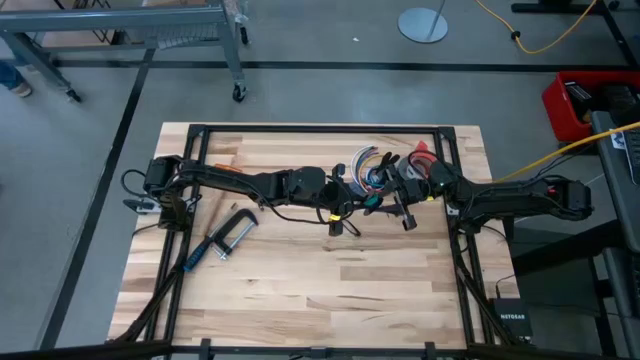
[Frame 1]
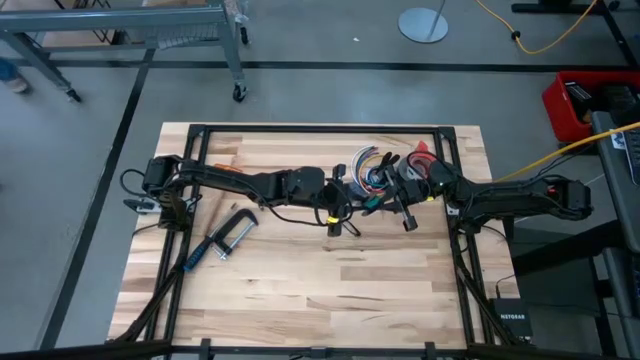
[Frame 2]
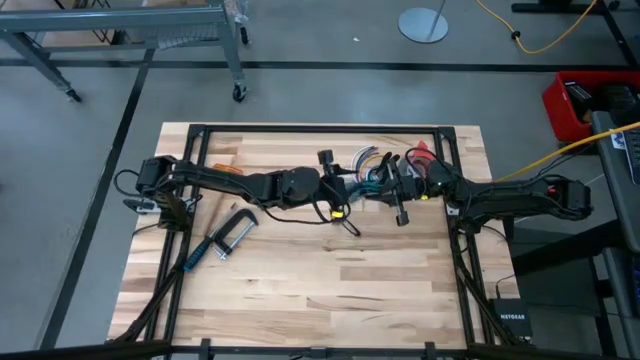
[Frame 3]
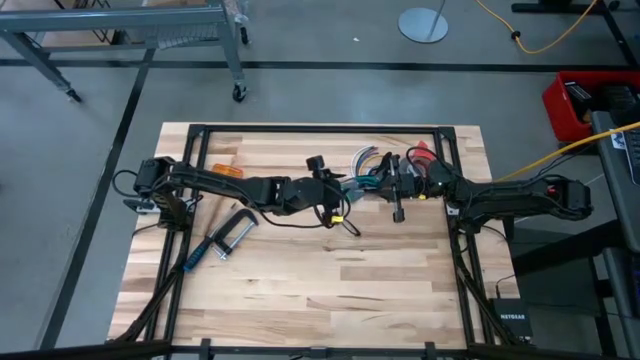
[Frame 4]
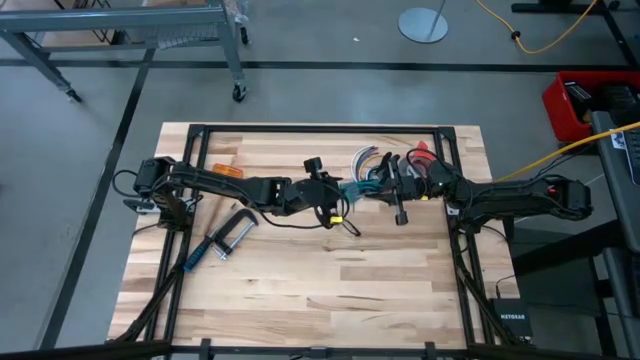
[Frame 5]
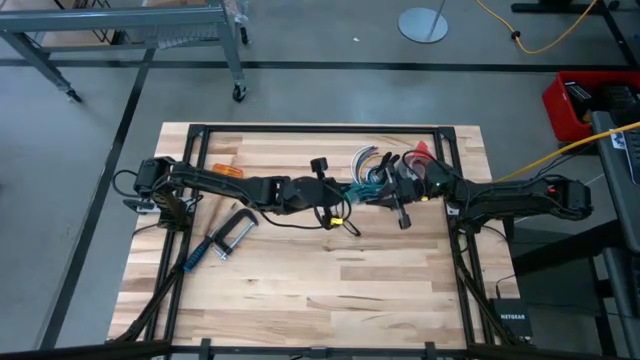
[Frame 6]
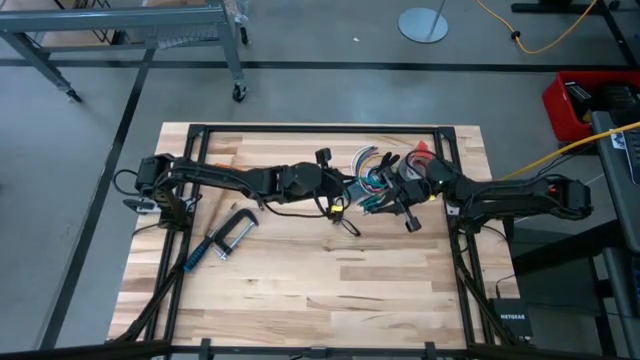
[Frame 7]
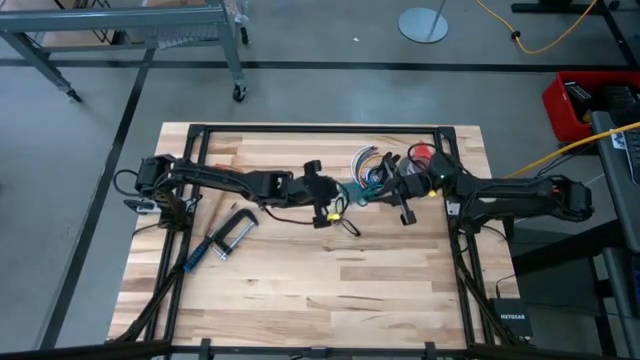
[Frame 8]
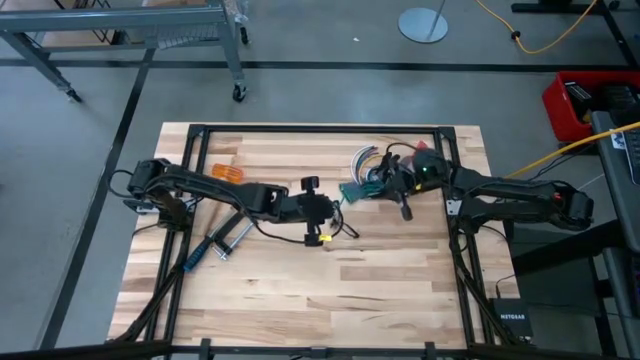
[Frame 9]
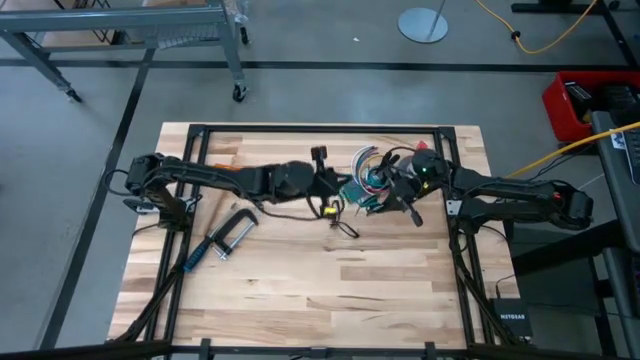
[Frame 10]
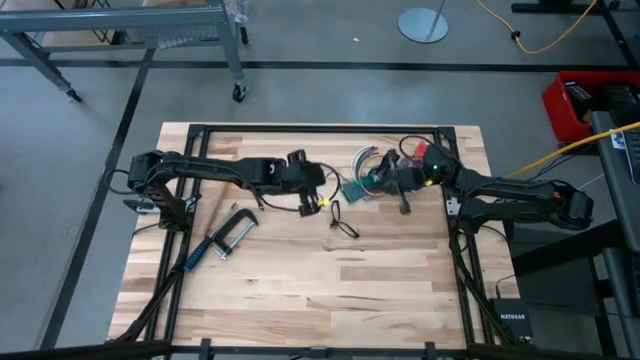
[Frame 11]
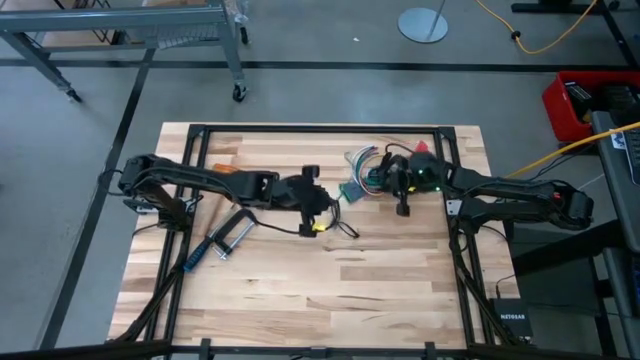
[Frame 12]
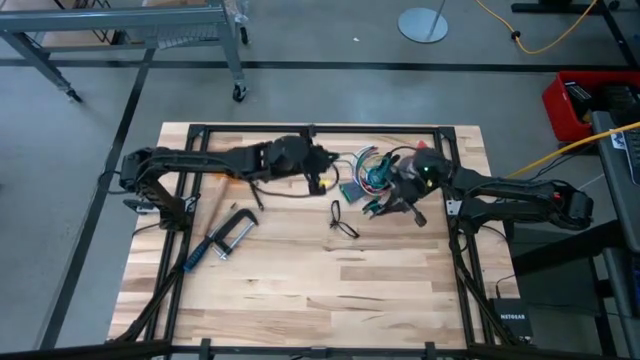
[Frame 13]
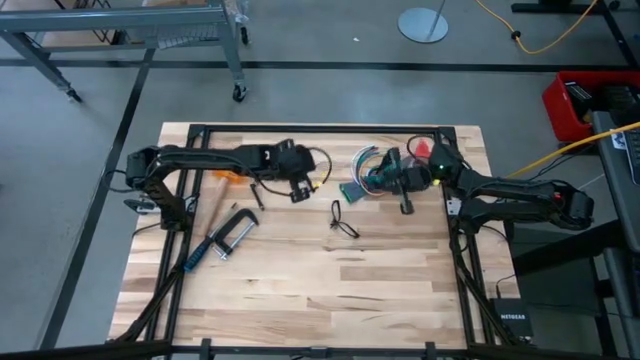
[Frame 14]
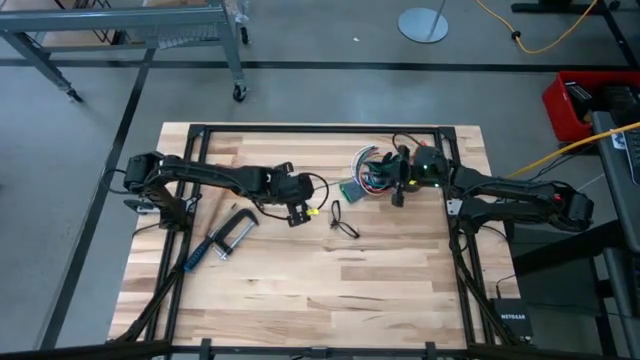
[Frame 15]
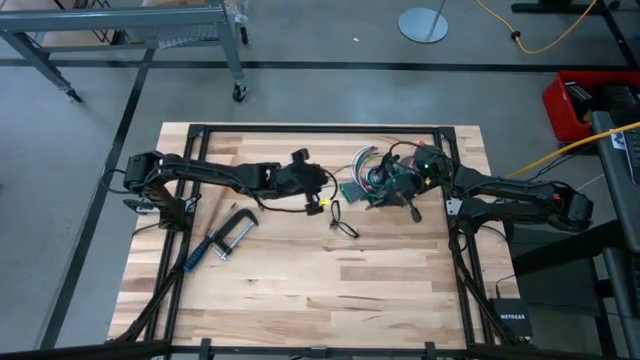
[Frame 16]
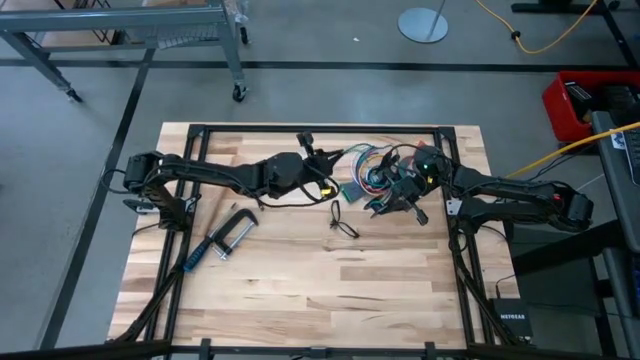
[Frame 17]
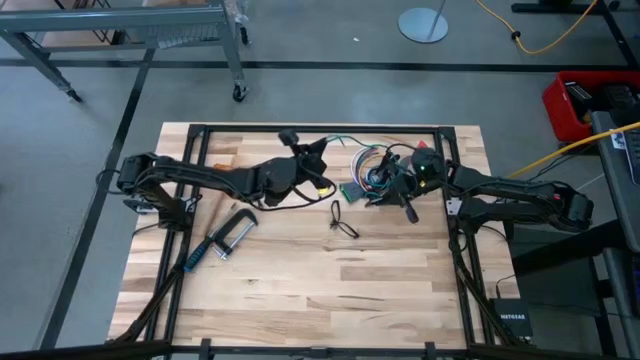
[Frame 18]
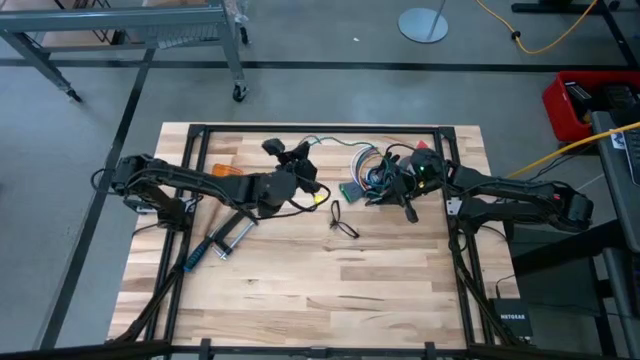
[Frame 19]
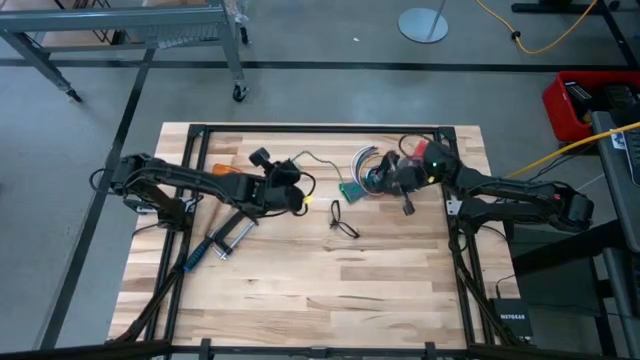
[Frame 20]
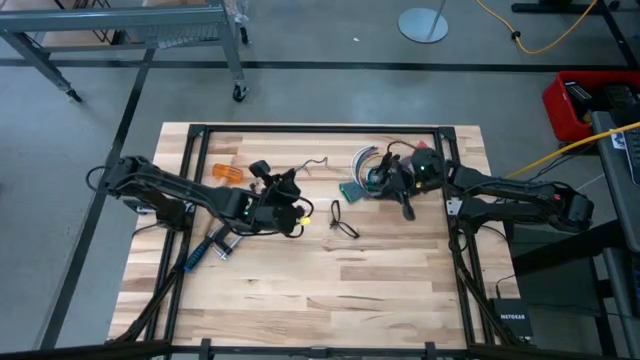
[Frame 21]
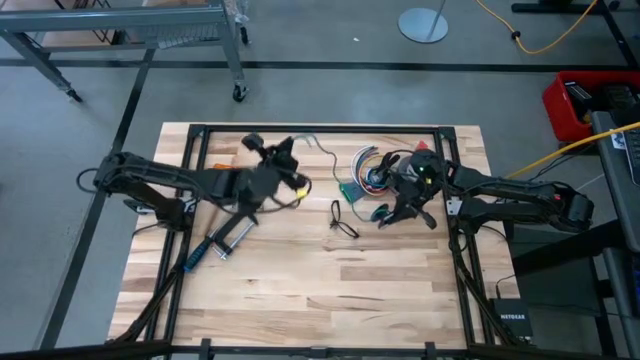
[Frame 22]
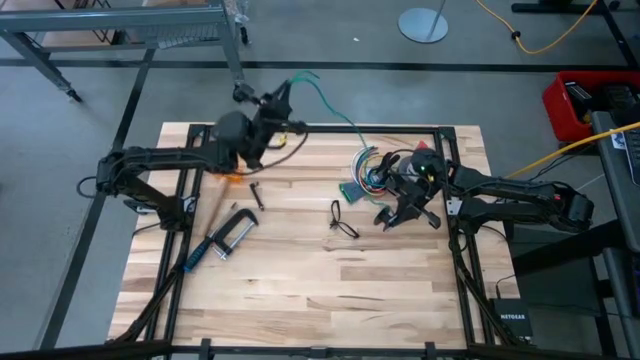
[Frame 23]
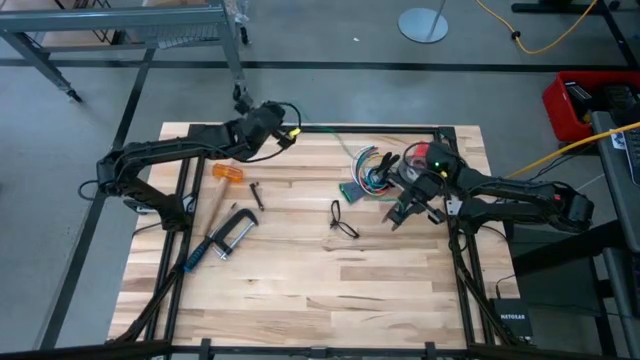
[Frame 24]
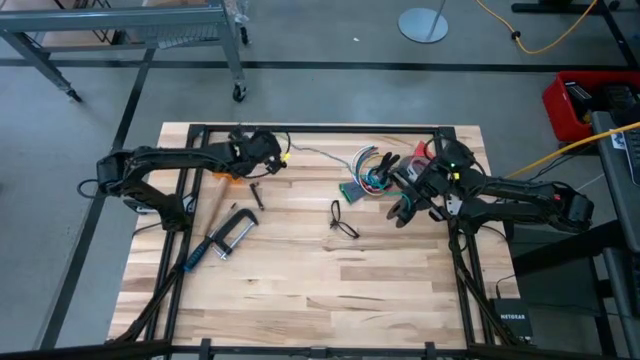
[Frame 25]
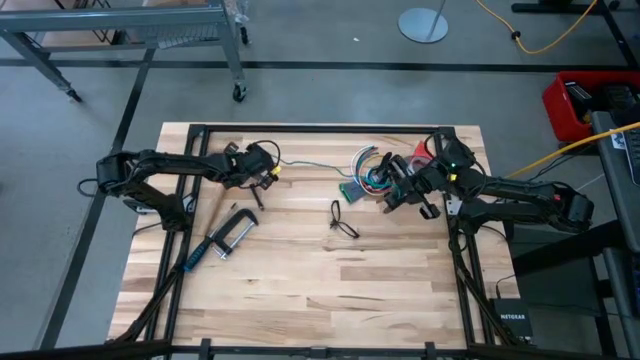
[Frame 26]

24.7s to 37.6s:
Task: Coil cords
Uncoil the green wire from the black spool

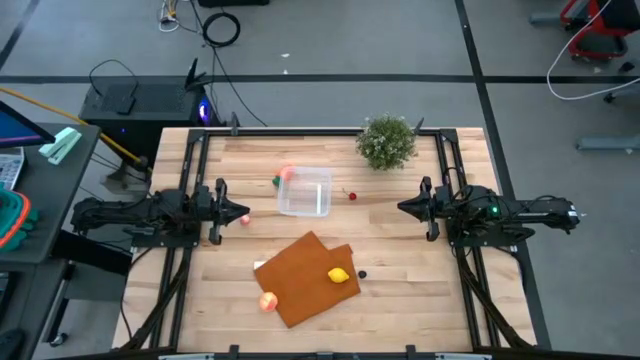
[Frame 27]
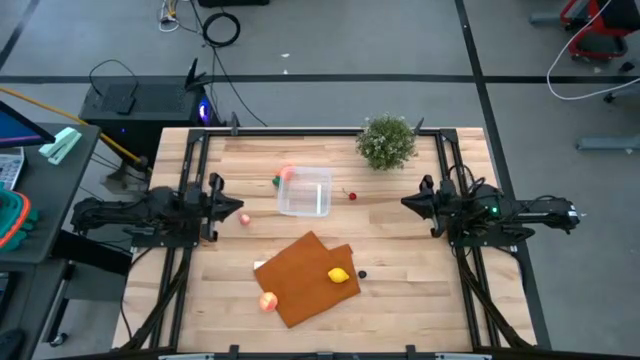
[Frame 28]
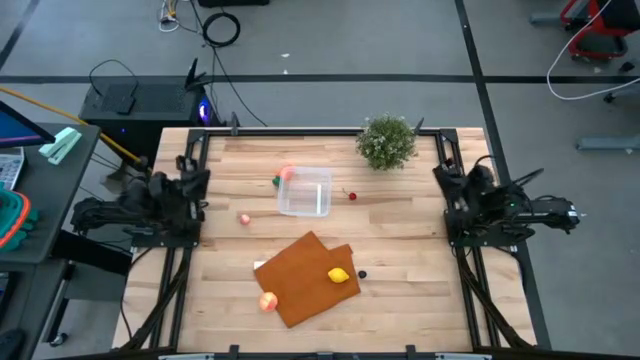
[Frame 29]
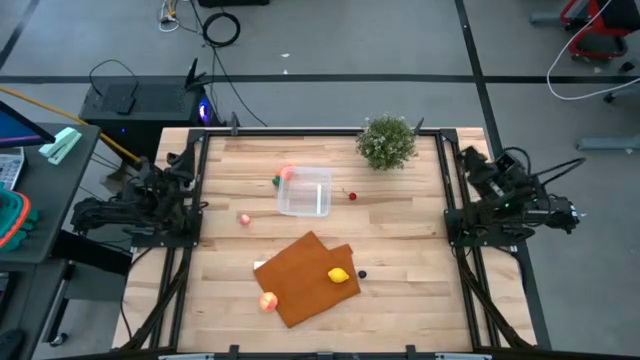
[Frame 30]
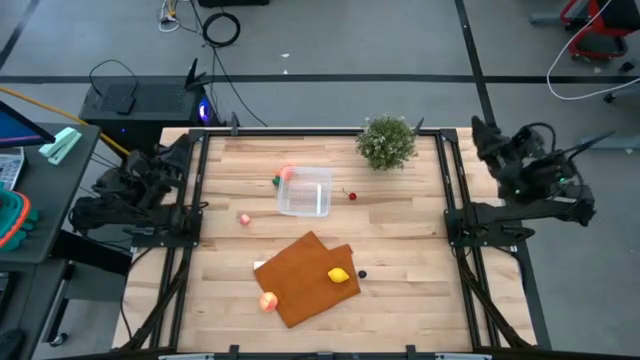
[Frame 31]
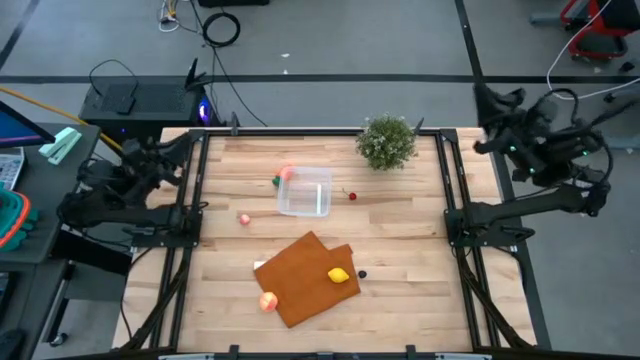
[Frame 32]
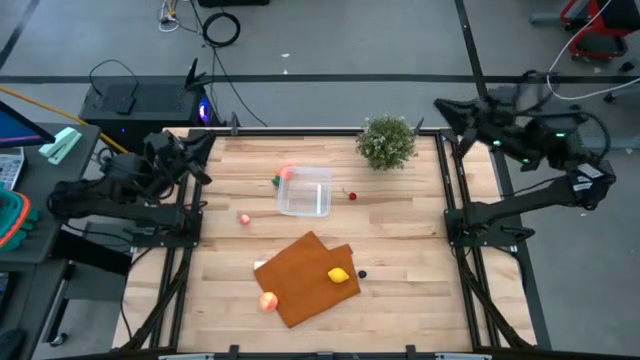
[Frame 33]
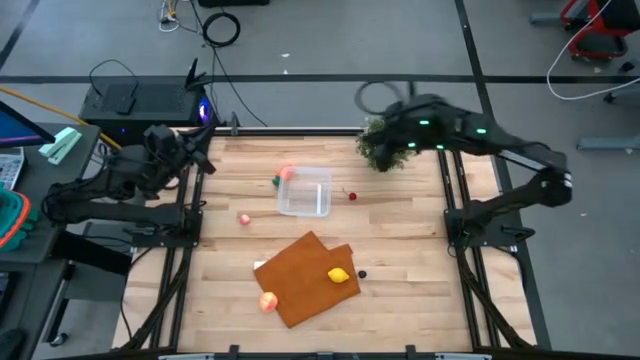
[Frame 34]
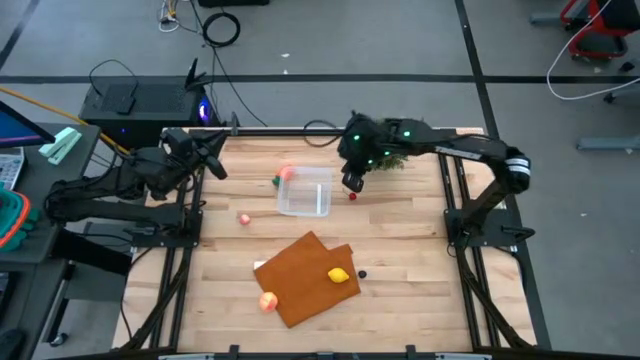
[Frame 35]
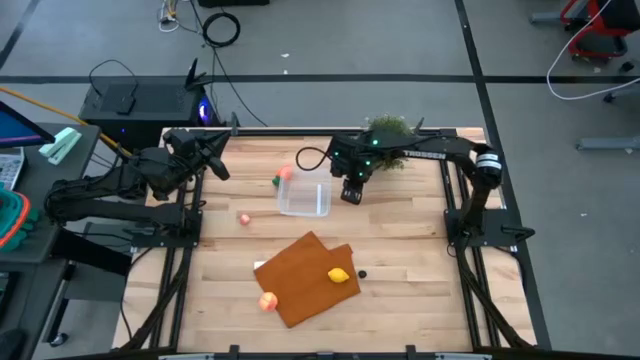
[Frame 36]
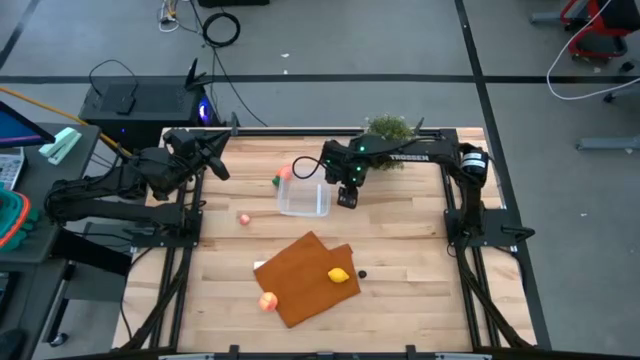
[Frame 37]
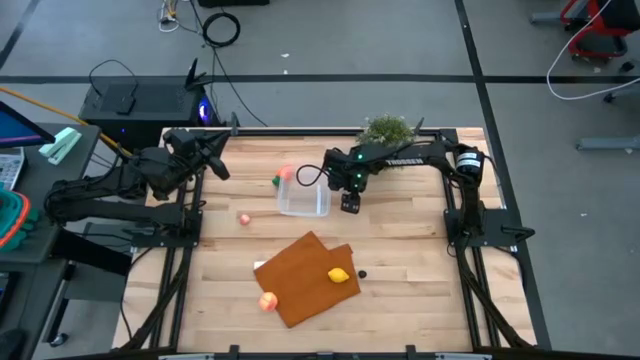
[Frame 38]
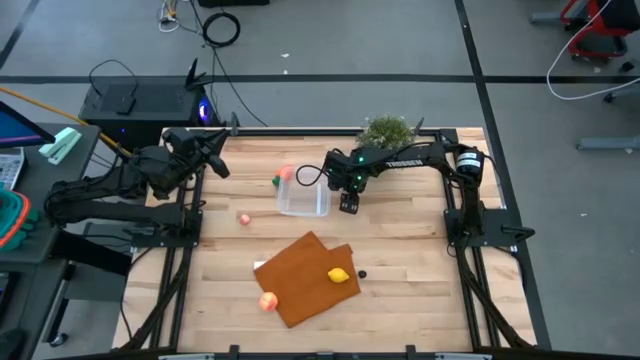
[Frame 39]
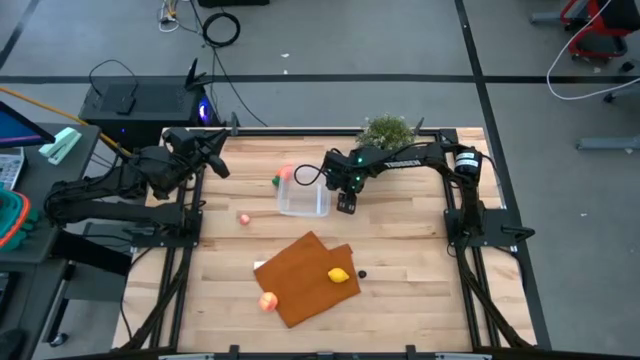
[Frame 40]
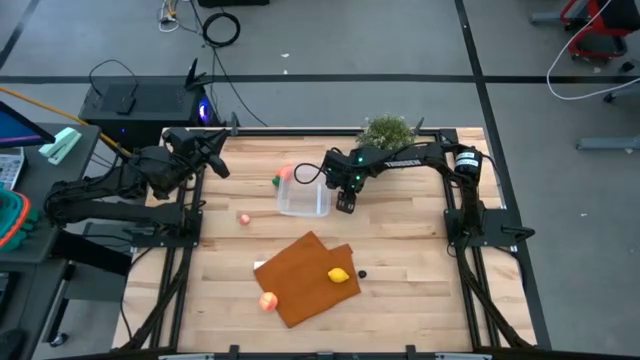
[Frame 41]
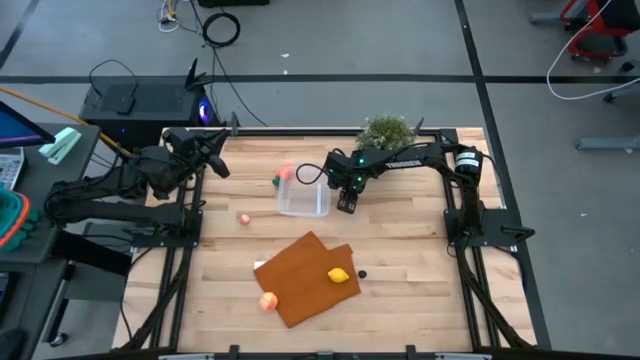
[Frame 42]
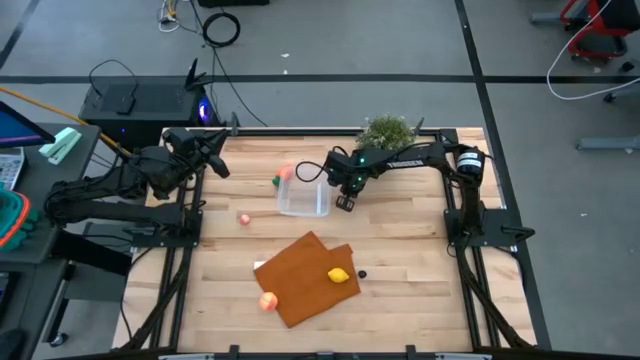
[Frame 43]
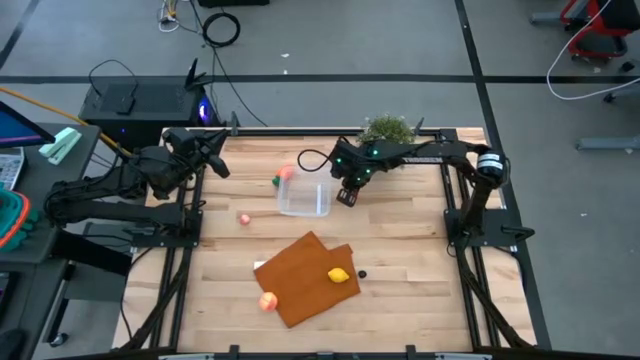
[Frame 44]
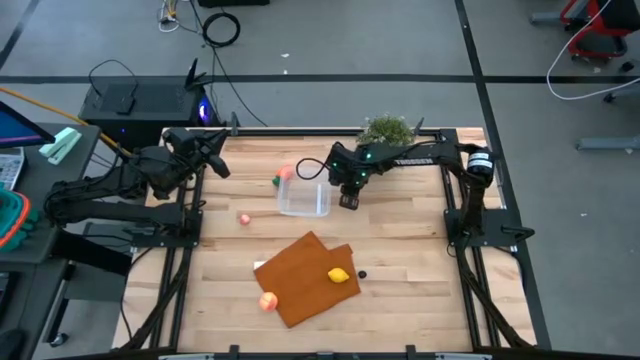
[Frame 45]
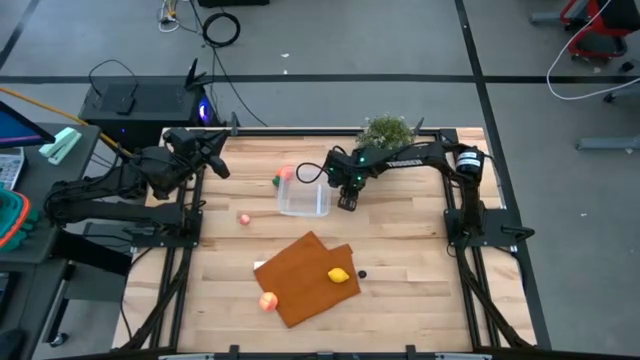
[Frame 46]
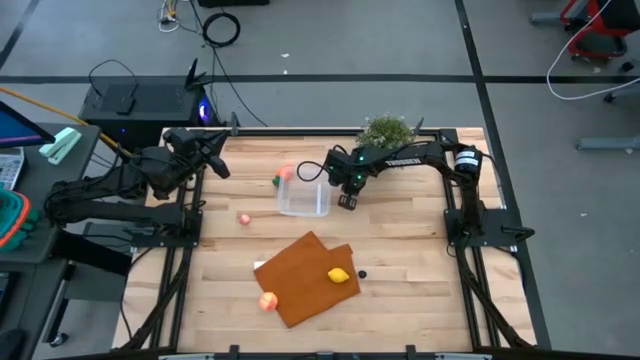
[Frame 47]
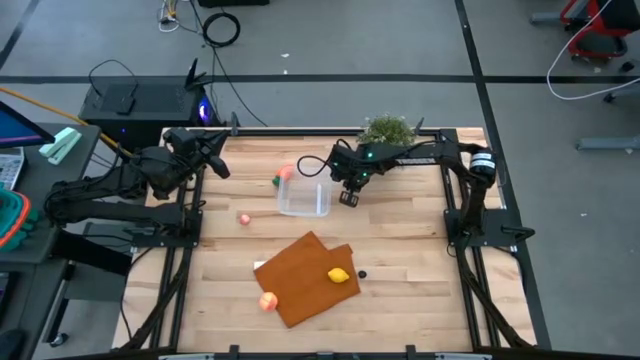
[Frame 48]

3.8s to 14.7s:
Task: Pick and placing Produce into tupperware
Put the red cherry into the transparent bin
